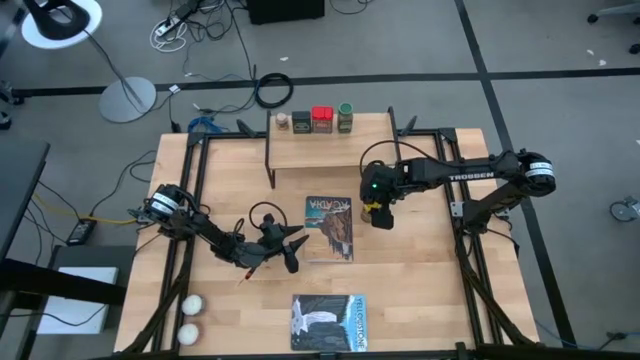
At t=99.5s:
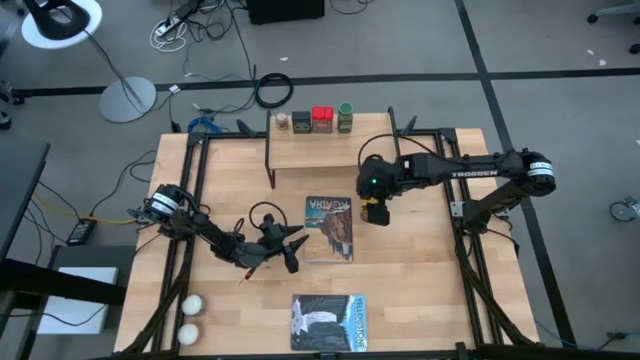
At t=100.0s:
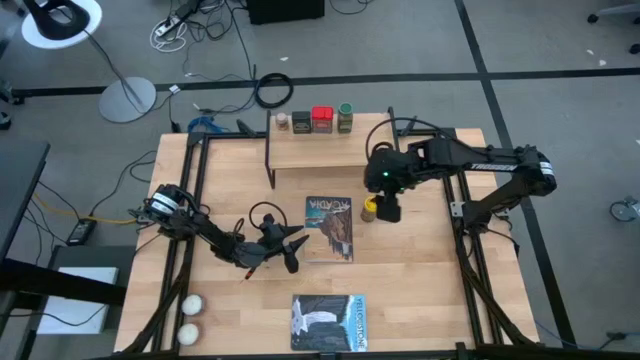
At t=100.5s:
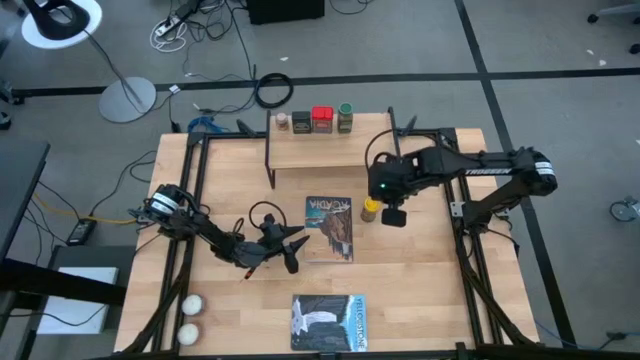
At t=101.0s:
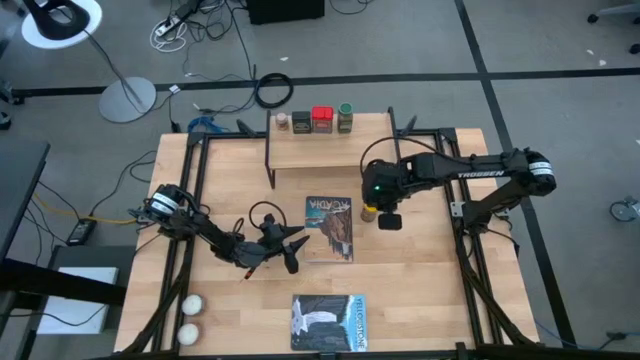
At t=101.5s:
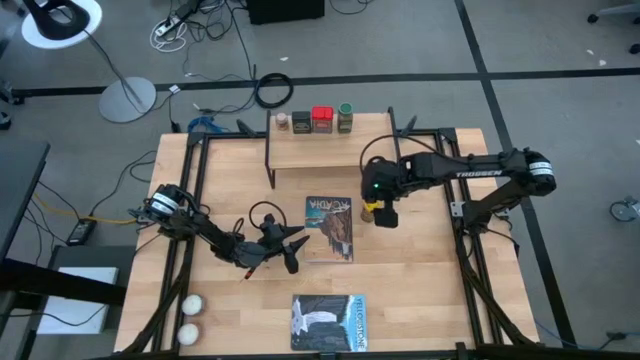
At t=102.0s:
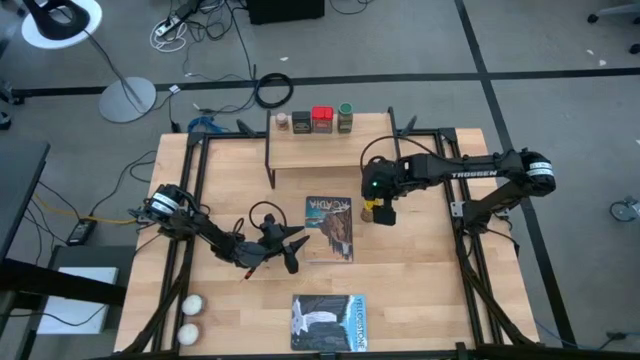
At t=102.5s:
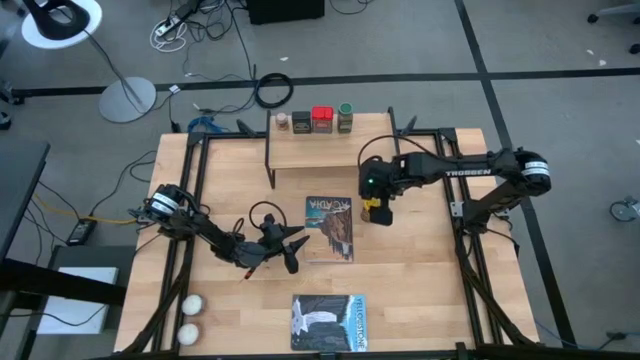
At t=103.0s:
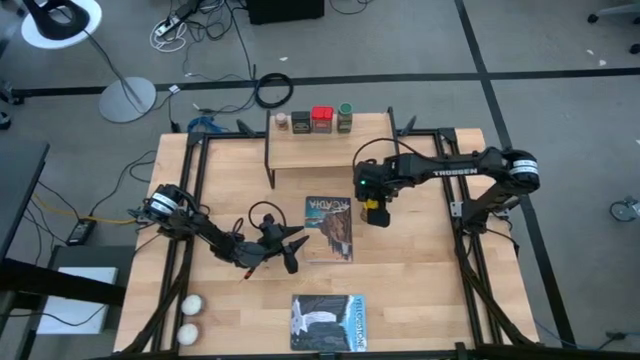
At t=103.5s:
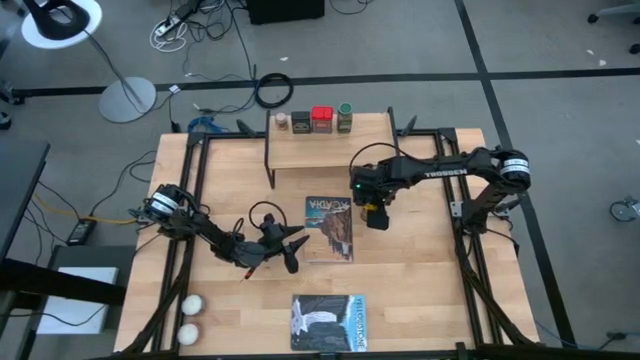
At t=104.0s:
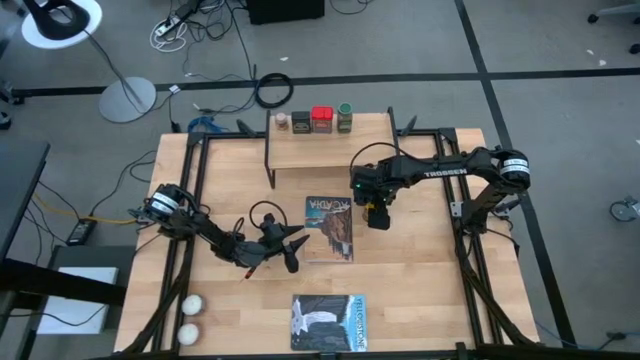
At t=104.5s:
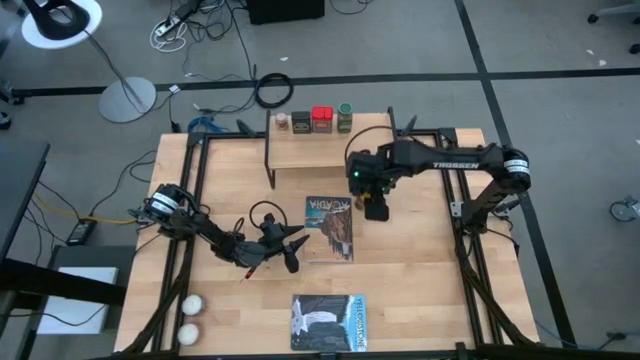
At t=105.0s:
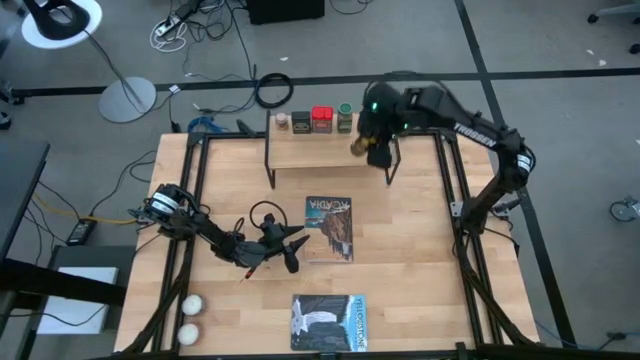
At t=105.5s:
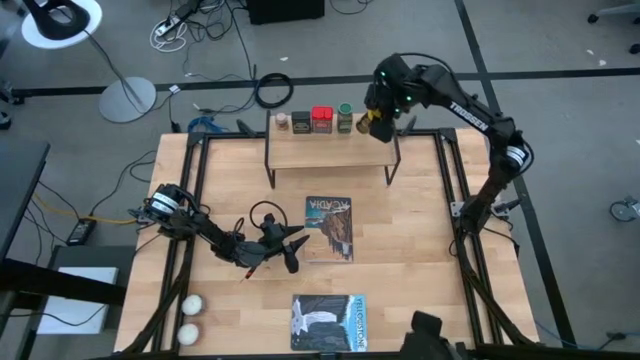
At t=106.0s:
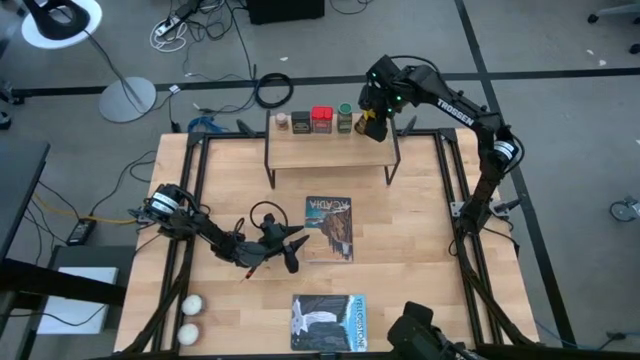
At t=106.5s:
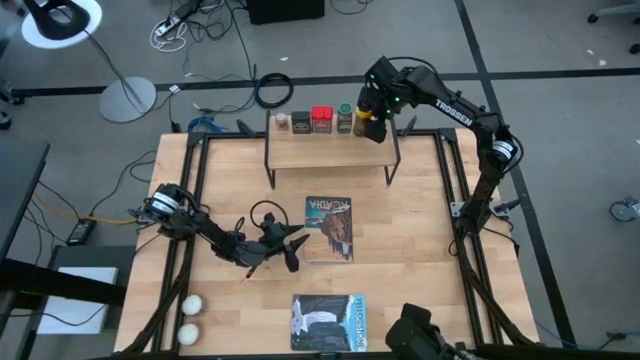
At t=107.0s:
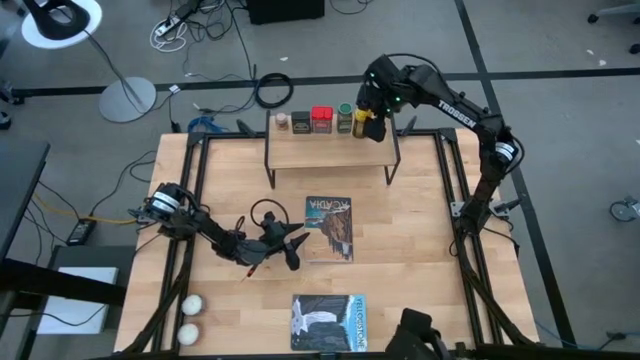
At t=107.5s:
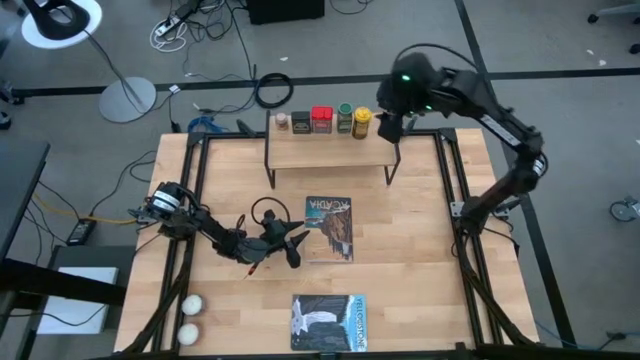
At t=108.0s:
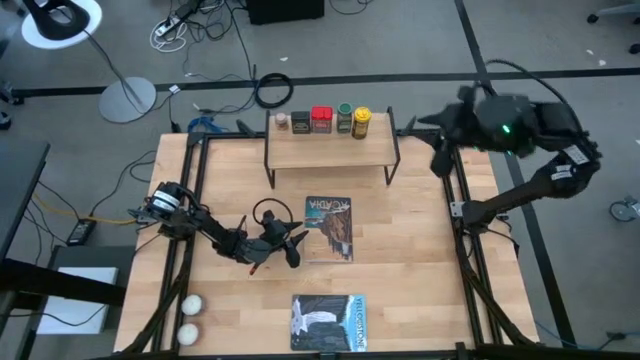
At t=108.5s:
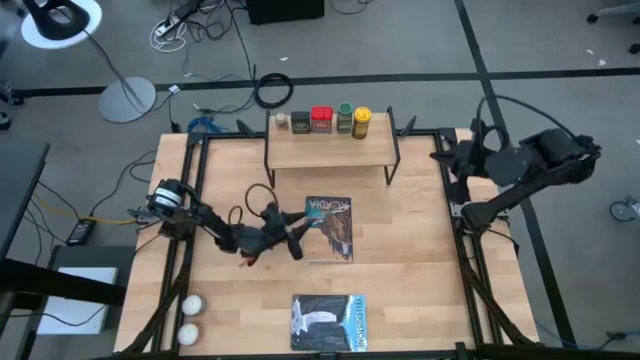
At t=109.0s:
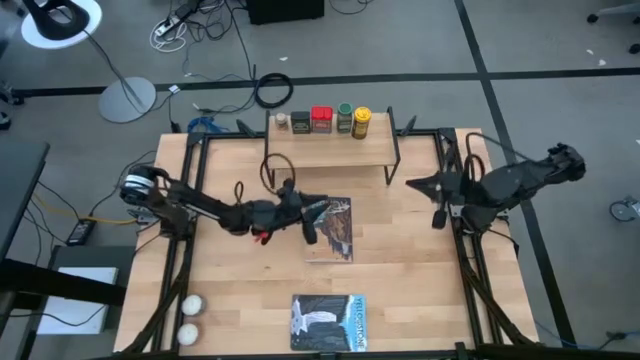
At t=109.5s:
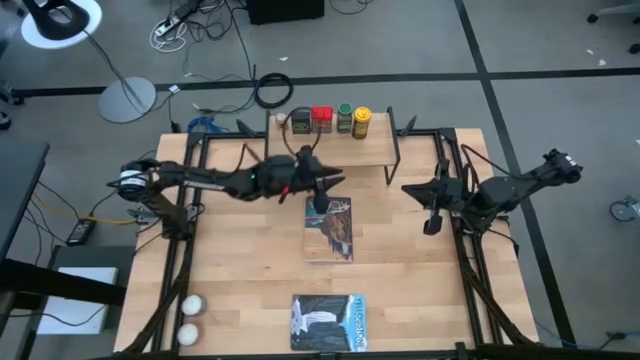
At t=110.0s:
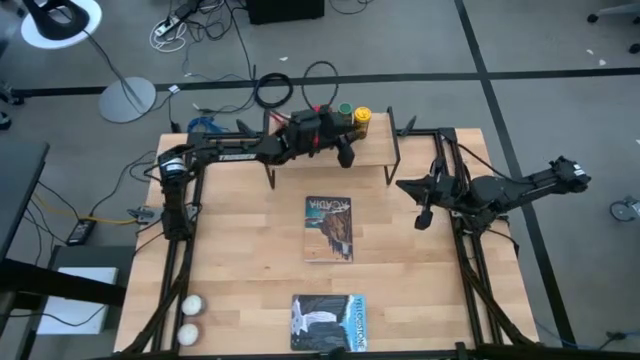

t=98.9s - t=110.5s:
Task: Shelf spices
Put the yellow seasoning bottle on the shelf

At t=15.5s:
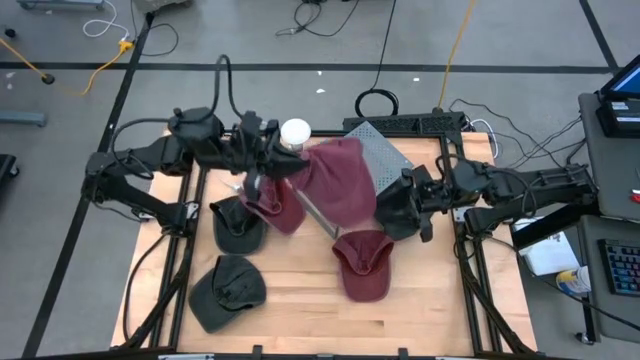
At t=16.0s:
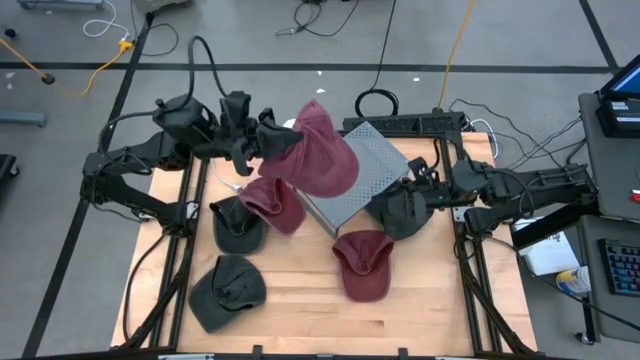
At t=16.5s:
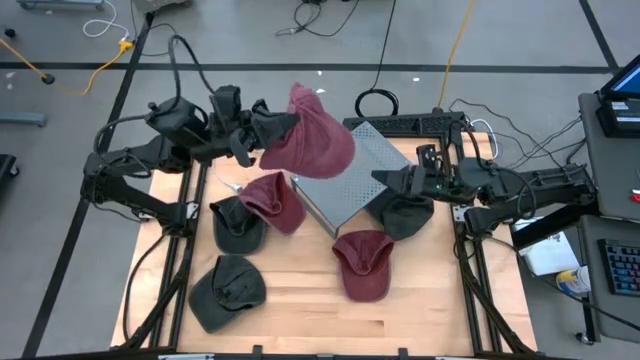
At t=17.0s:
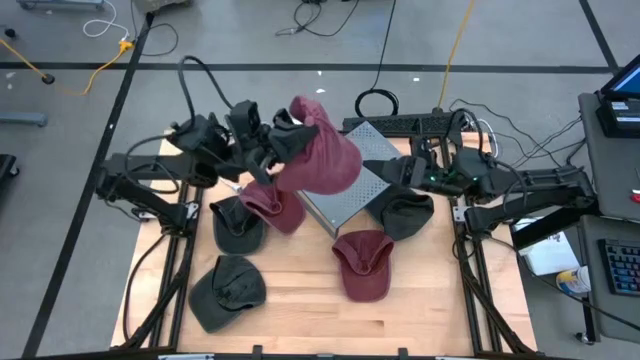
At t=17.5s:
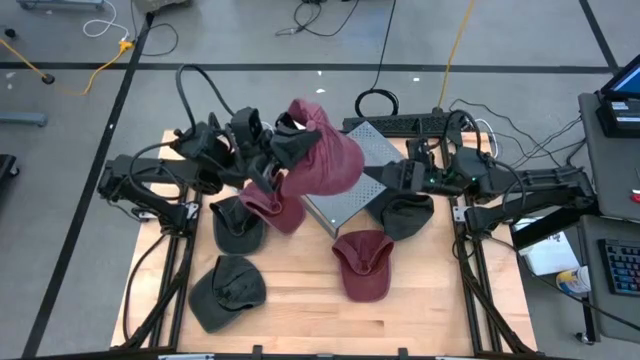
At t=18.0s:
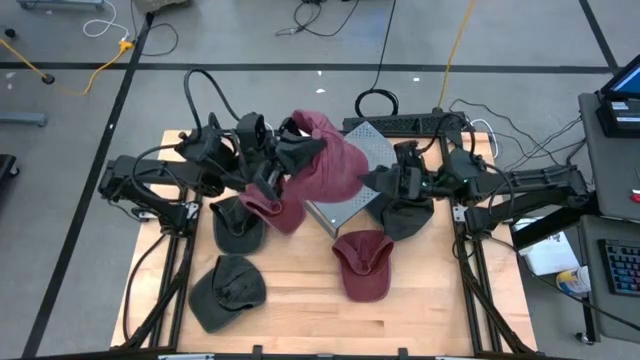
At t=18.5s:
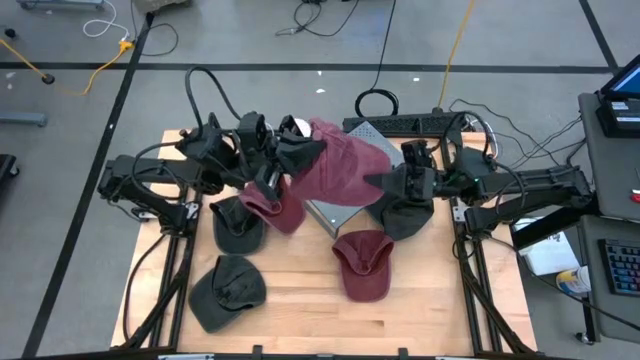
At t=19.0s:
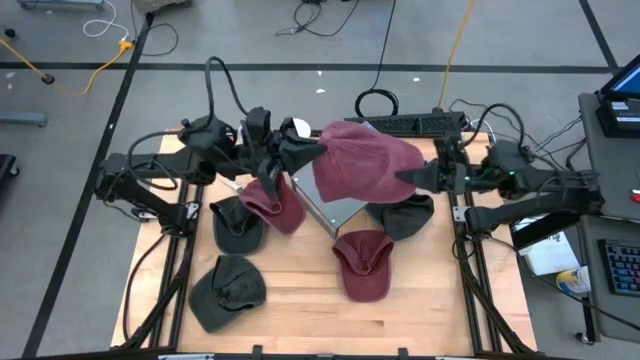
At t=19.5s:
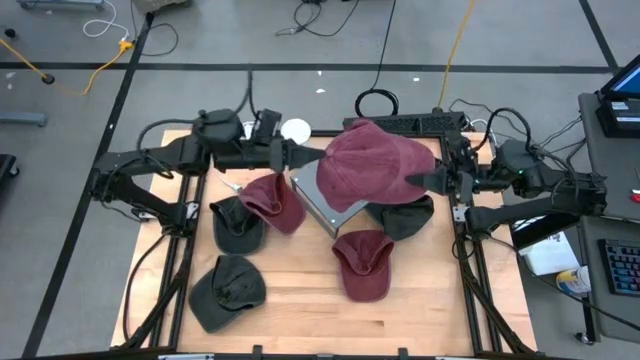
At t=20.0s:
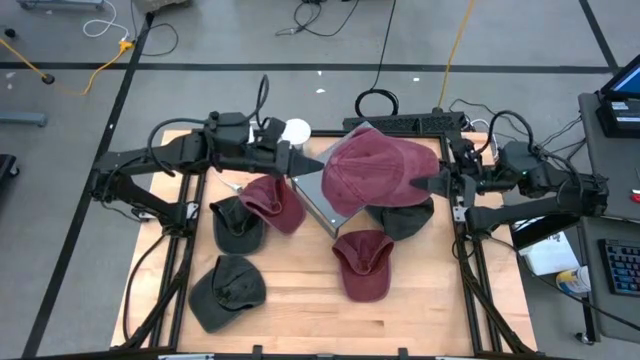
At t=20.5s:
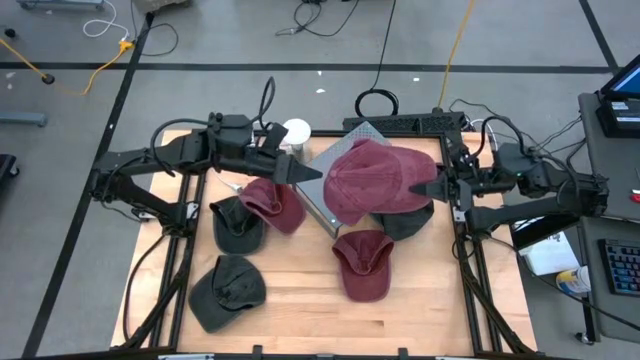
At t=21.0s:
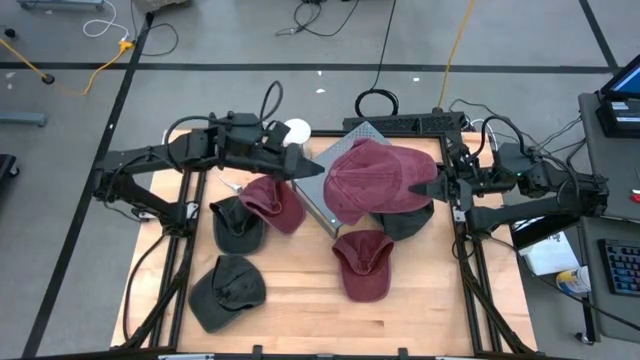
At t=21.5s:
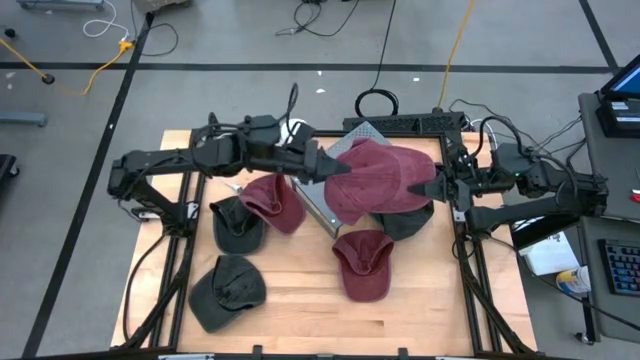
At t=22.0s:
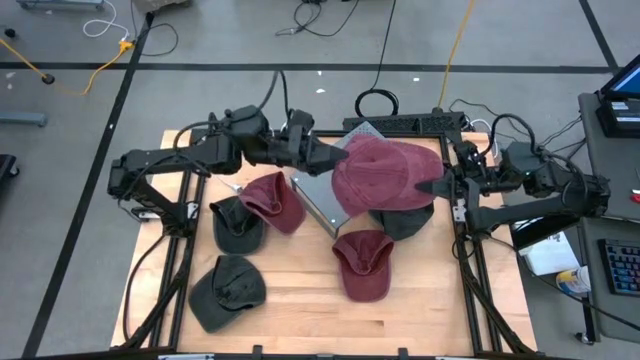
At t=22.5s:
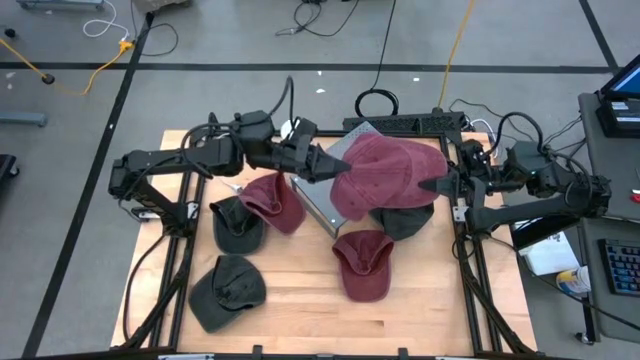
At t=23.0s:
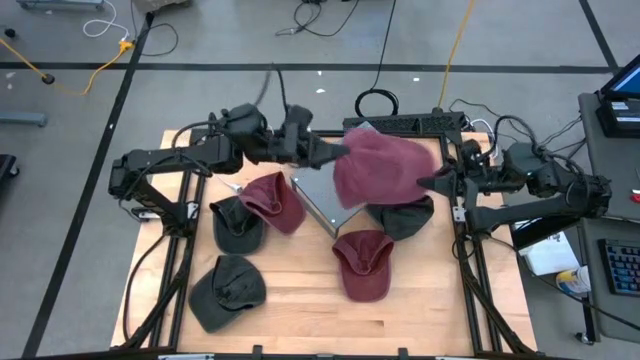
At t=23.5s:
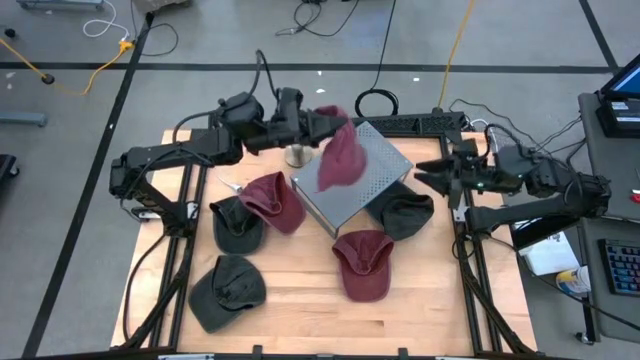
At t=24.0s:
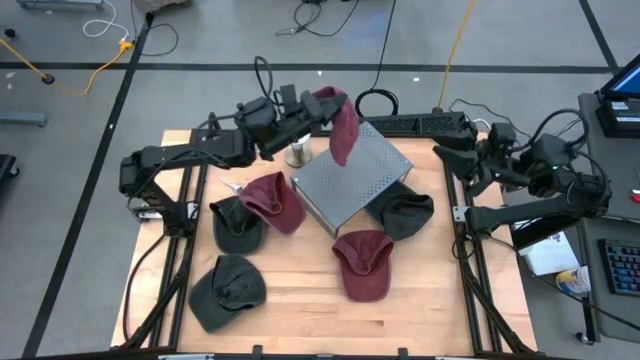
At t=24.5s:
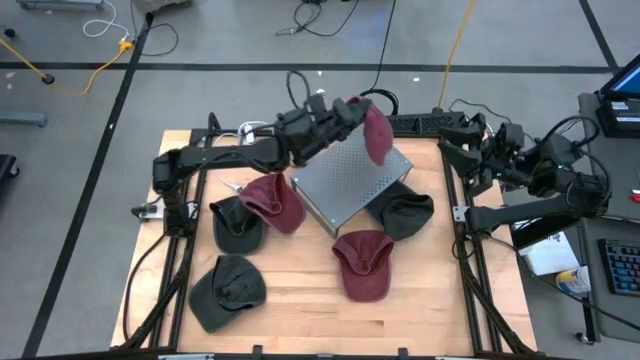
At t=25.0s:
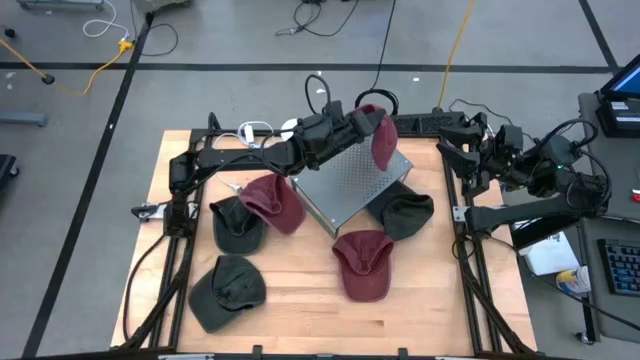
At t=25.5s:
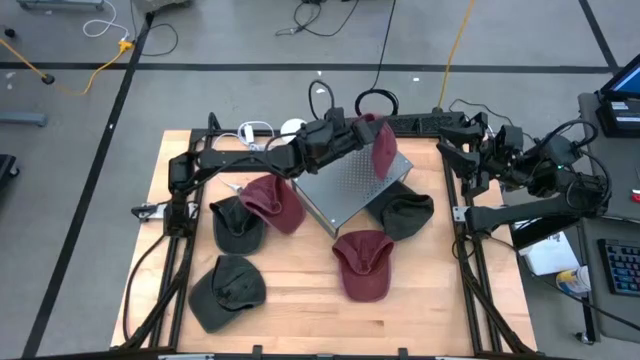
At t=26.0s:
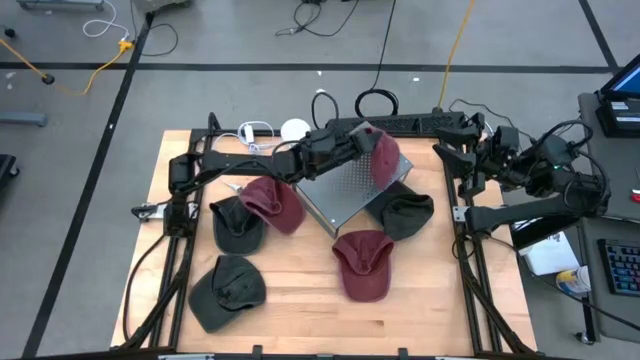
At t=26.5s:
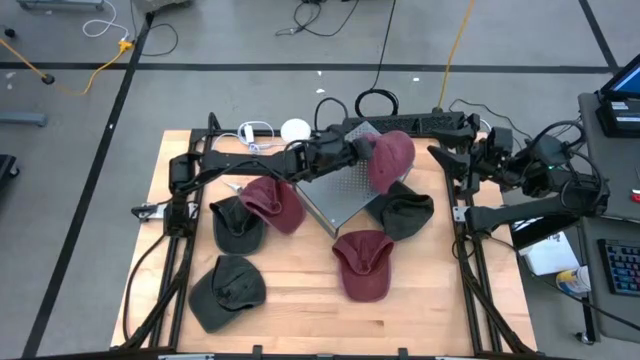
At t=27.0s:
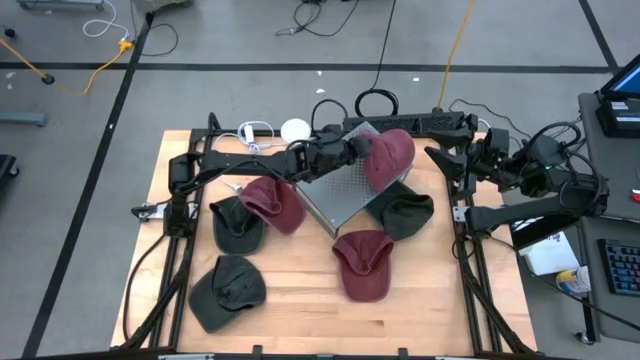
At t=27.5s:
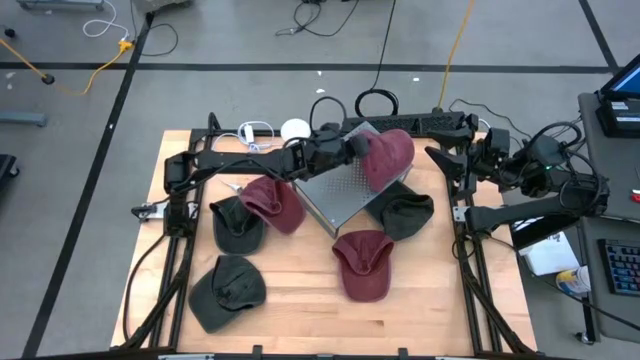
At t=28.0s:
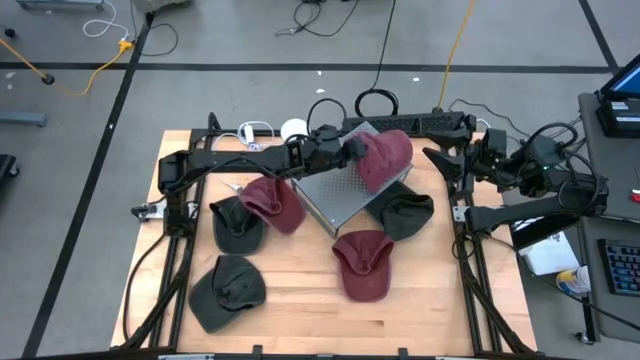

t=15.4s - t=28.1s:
Task: Pick & Place hat
Put the right red cap on the shelf
